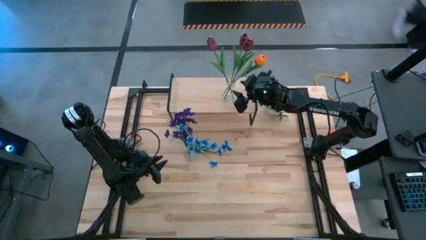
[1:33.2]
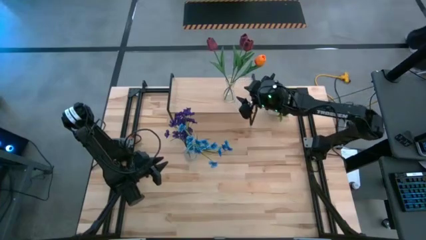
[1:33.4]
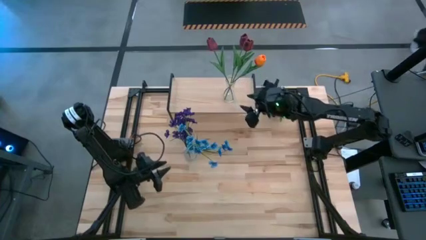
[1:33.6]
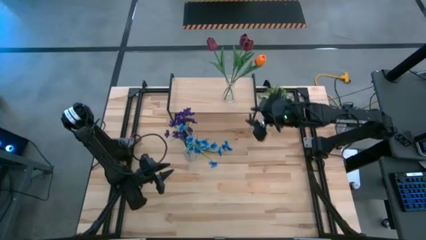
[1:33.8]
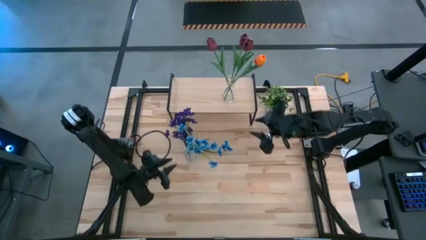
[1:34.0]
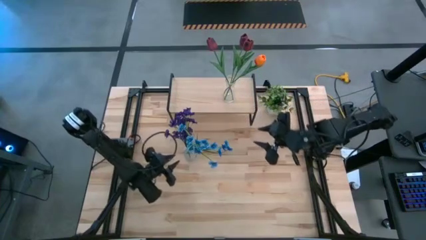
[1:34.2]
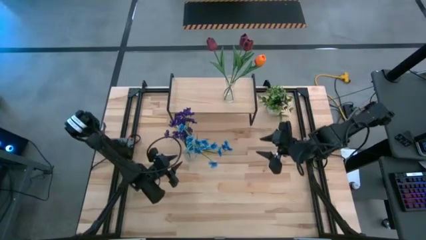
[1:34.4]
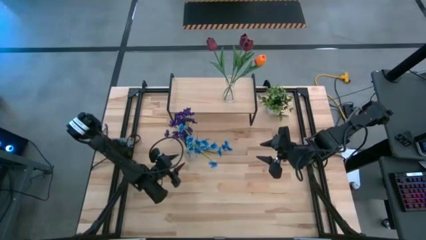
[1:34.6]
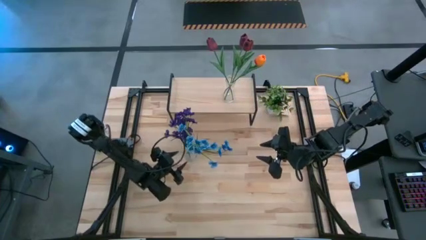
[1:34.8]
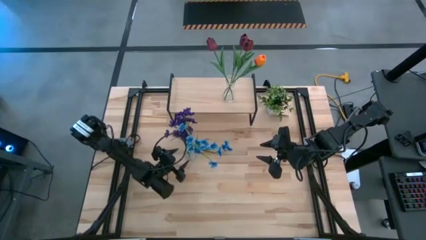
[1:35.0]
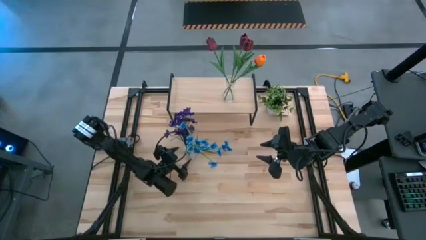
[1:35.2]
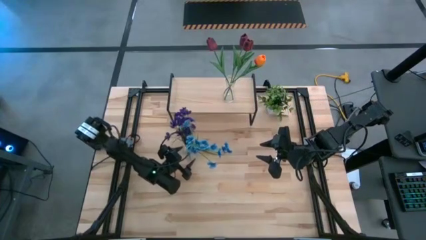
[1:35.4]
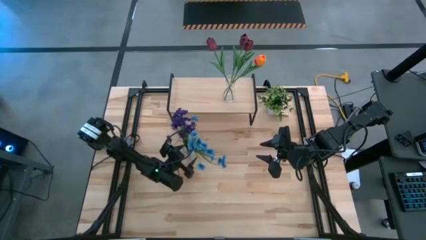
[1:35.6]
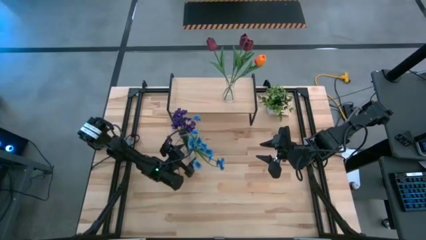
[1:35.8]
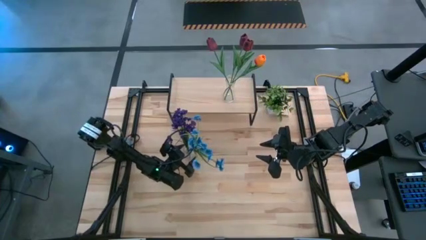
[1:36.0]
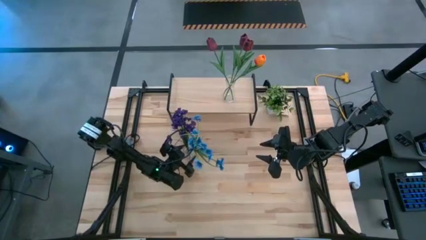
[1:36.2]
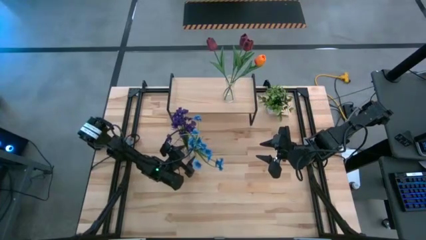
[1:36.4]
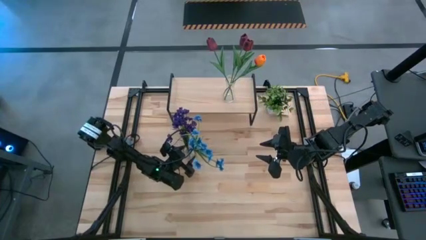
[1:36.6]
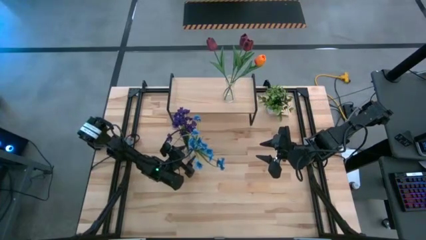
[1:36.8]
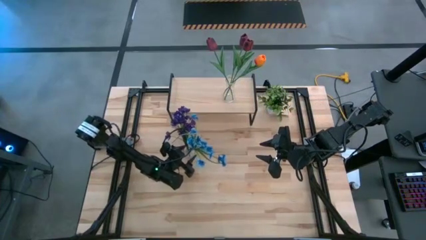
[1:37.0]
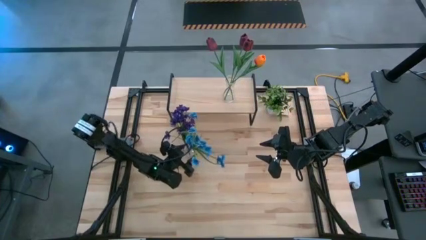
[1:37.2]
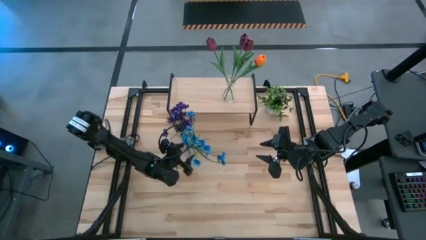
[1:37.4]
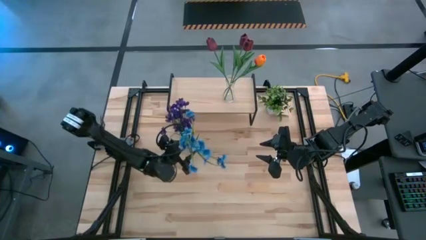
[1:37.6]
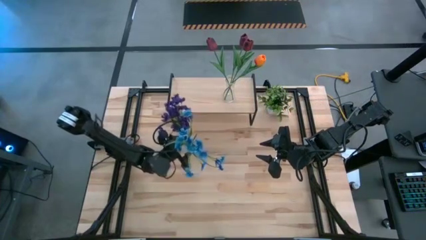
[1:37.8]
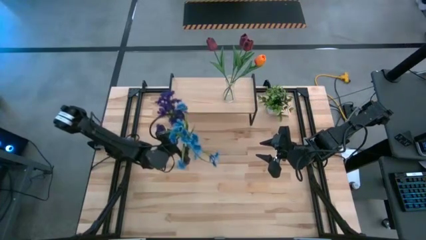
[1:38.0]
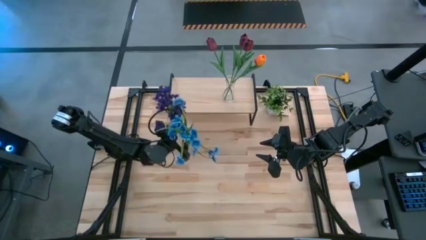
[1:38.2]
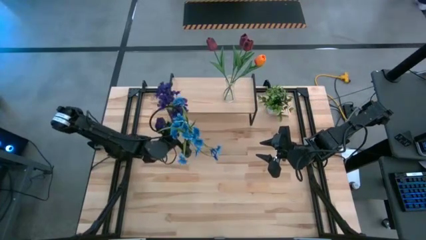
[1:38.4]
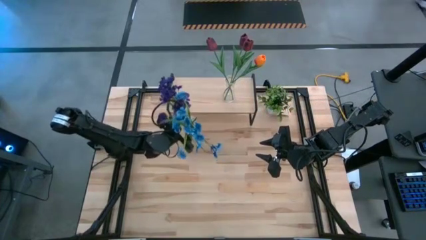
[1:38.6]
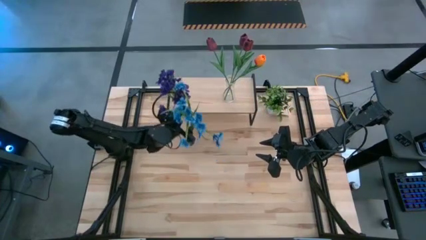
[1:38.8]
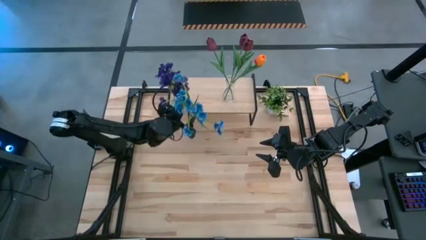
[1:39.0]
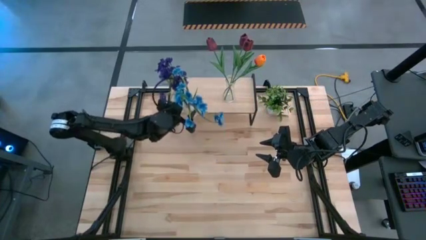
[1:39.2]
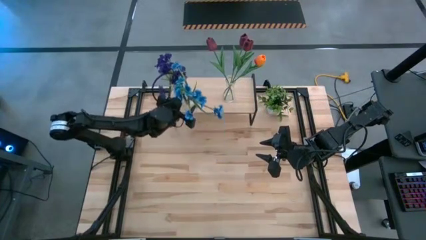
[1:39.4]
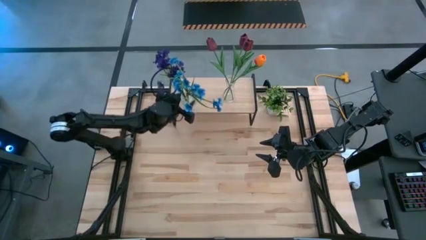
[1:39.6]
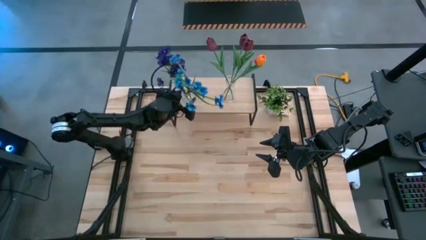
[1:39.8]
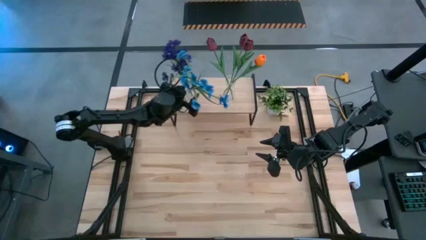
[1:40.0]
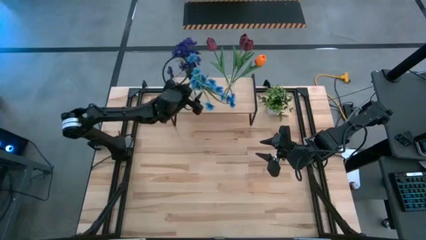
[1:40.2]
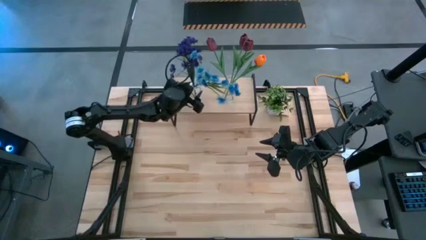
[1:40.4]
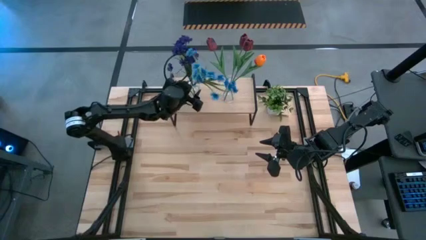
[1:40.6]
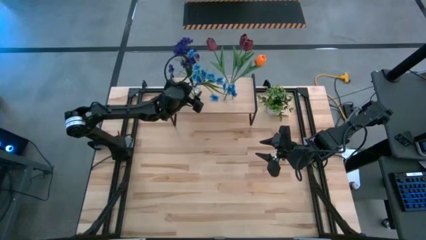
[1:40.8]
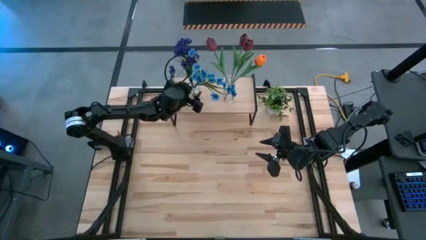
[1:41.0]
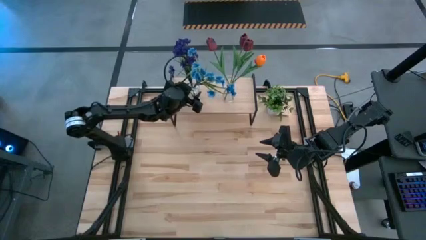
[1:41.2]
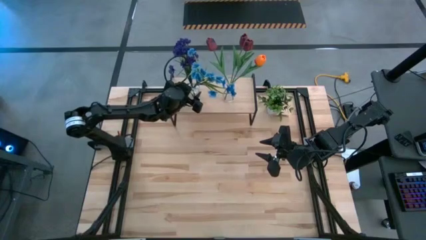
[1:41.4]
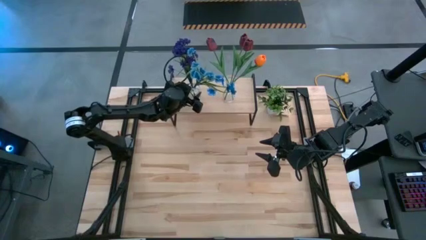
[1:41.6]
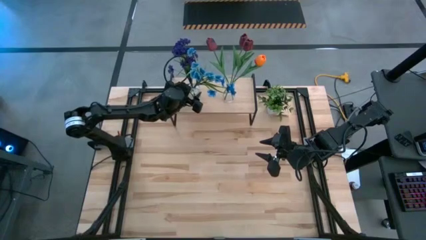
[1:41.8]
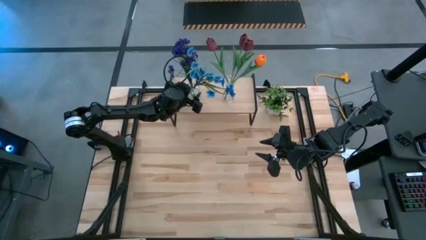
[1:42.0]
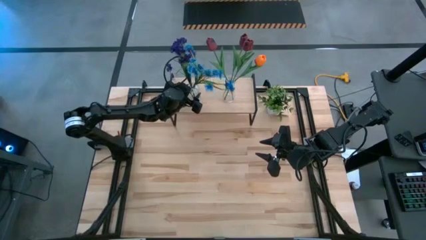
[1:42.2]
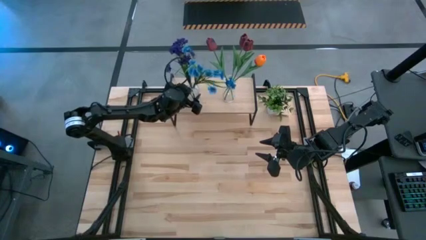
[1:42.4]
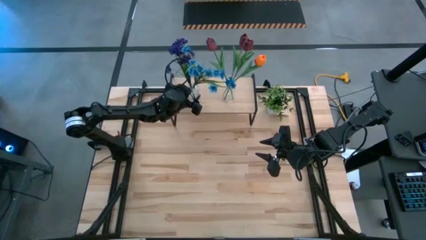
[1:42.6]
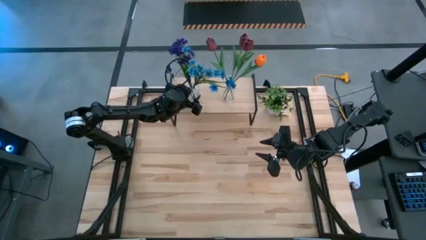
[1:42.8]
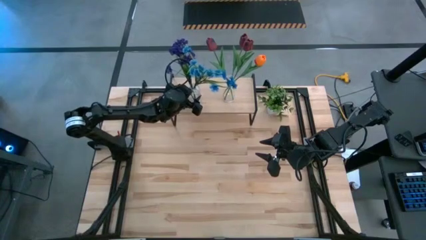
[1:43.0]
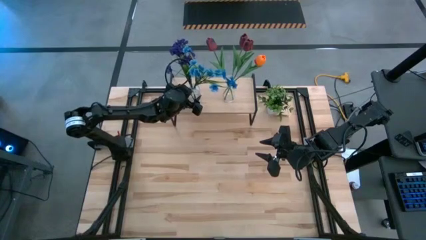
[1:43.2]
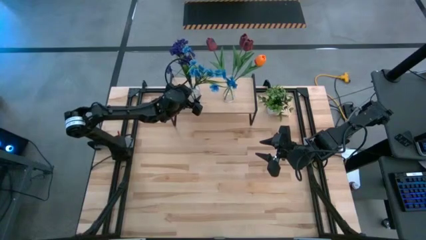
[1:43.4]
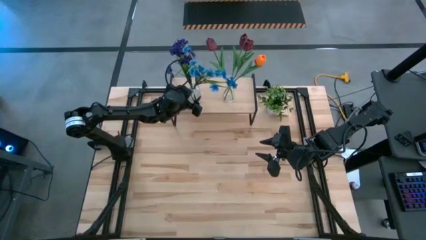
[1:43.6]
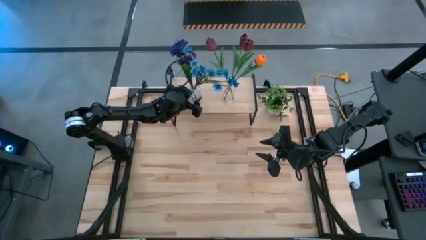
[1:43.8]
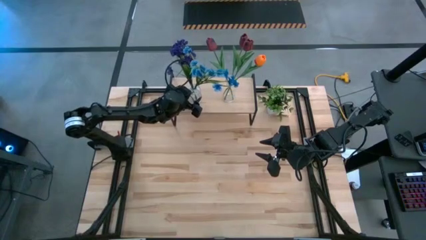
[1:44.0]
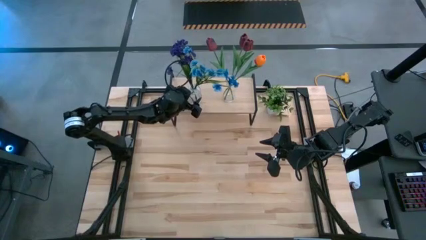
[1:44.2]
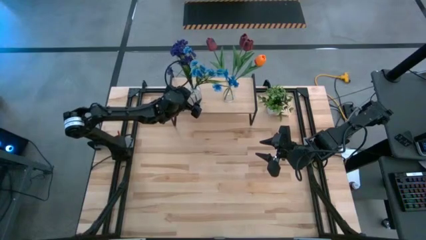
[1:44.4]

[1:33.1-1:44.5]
Task: Pick and place flowers into a vace then onto a shelf
Put the transparent vase with orchids on the shelf

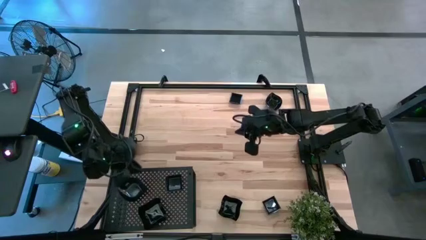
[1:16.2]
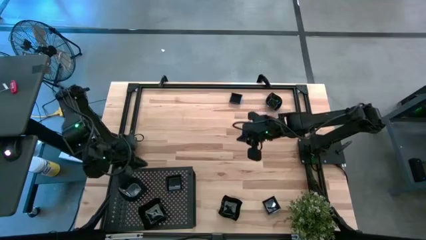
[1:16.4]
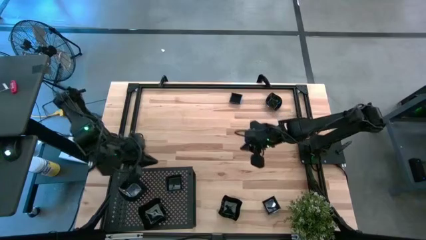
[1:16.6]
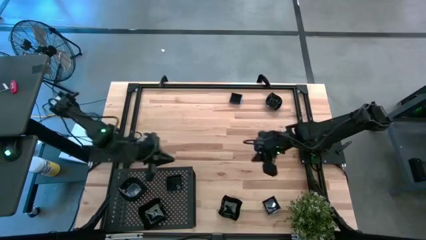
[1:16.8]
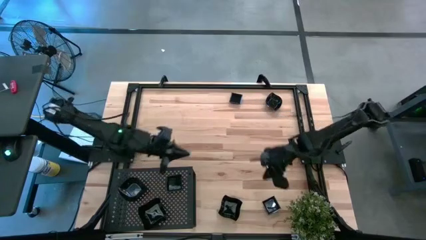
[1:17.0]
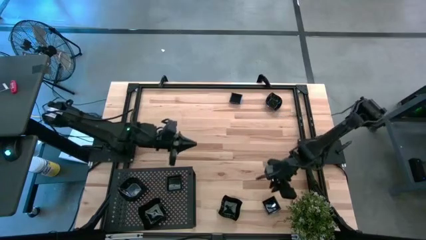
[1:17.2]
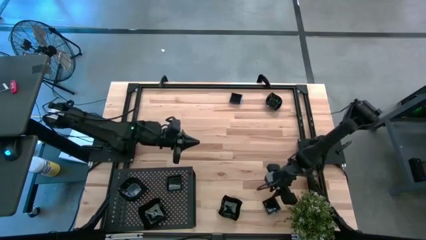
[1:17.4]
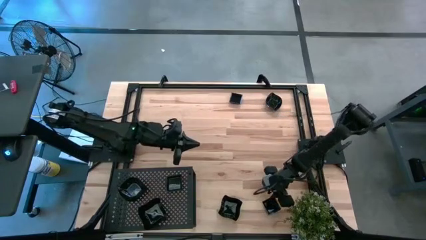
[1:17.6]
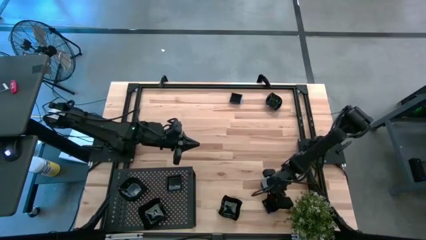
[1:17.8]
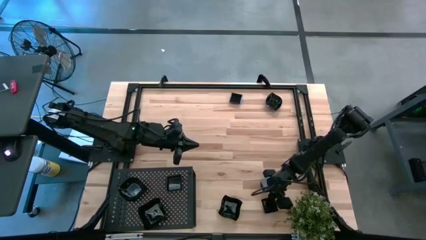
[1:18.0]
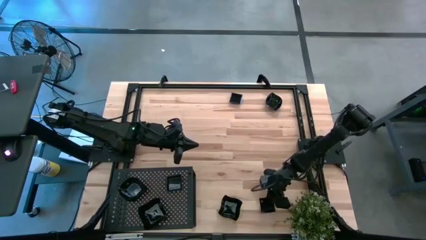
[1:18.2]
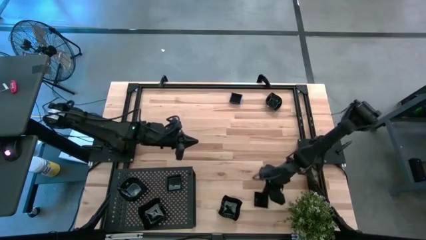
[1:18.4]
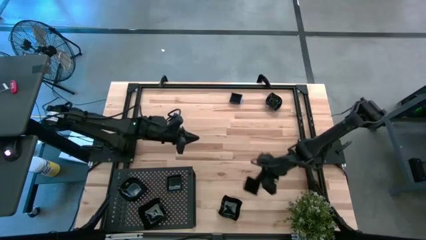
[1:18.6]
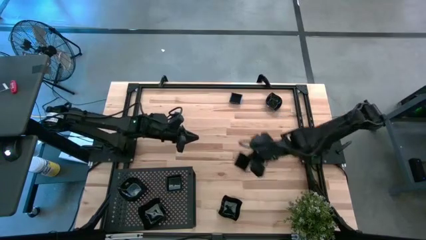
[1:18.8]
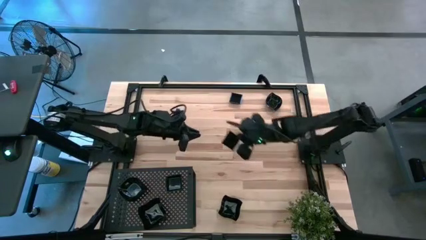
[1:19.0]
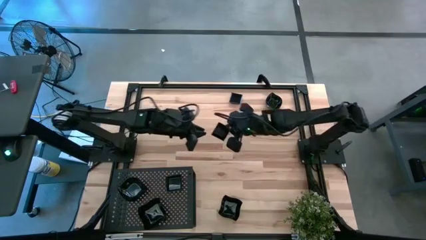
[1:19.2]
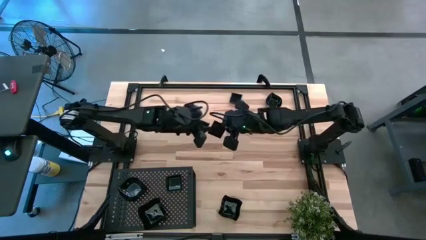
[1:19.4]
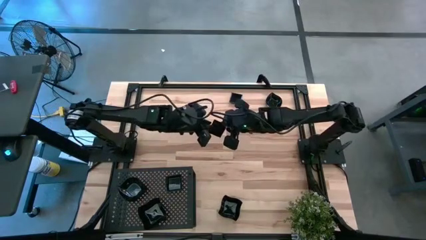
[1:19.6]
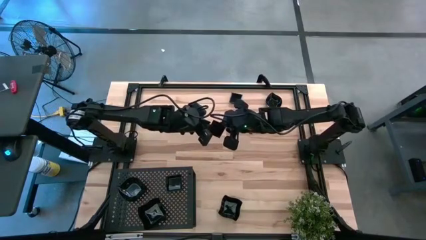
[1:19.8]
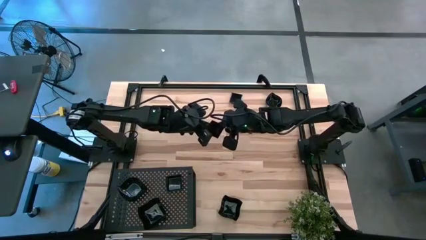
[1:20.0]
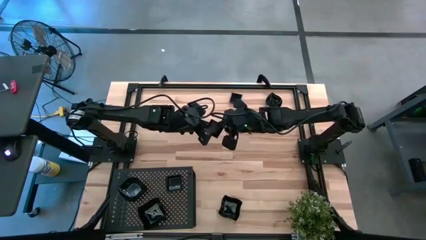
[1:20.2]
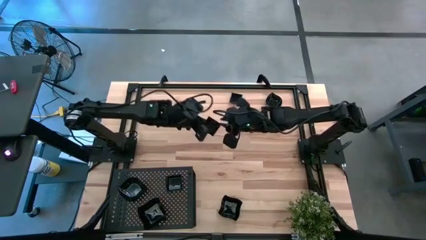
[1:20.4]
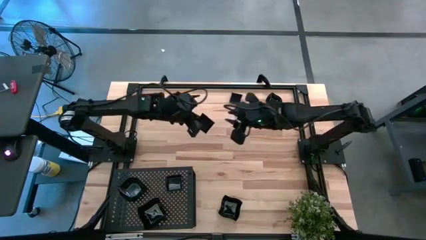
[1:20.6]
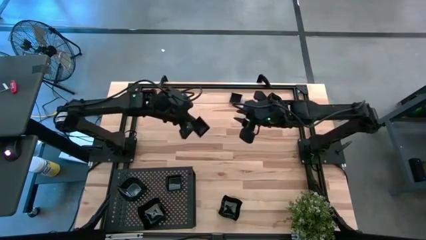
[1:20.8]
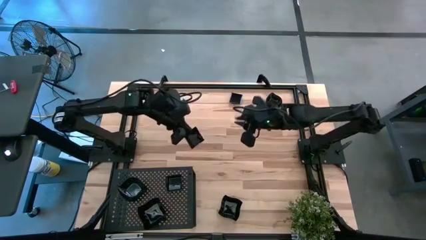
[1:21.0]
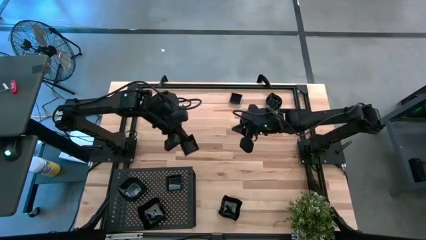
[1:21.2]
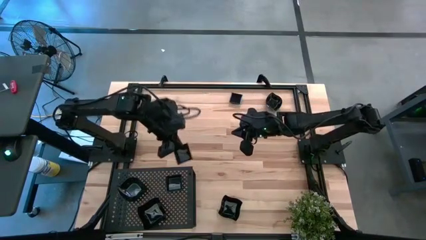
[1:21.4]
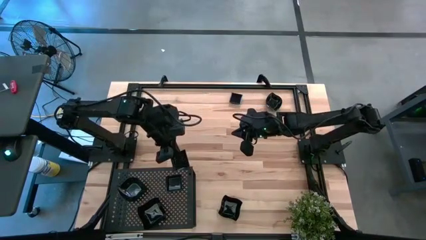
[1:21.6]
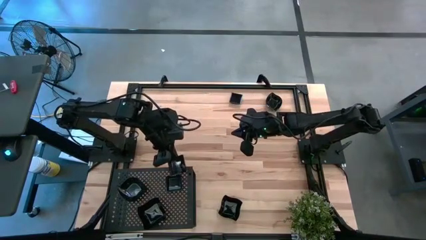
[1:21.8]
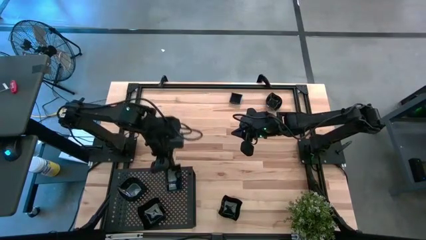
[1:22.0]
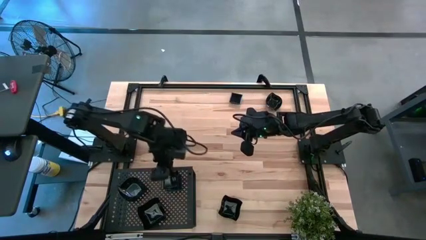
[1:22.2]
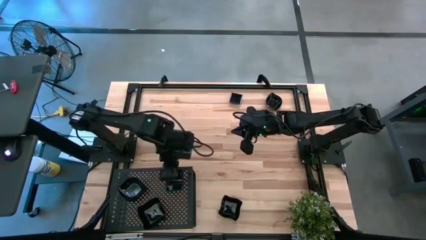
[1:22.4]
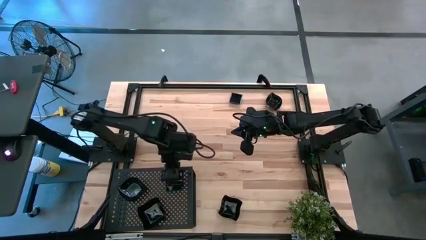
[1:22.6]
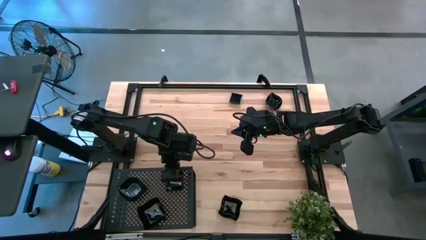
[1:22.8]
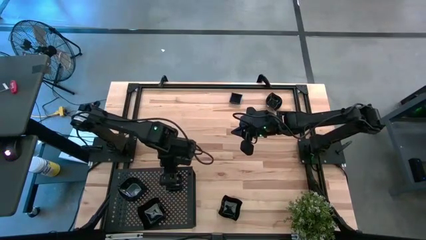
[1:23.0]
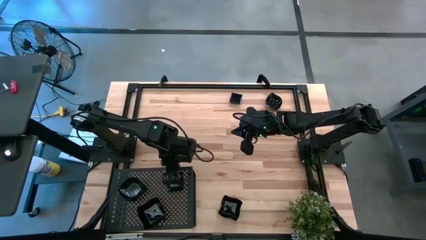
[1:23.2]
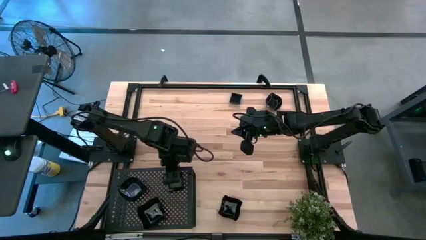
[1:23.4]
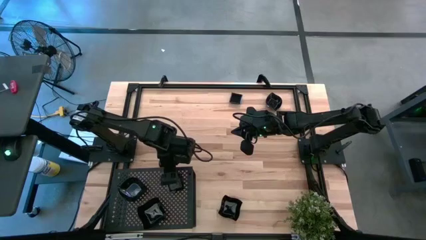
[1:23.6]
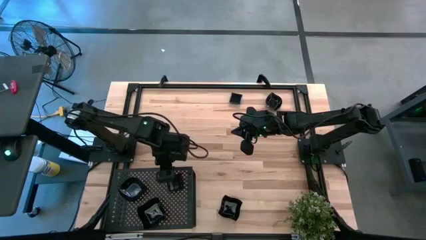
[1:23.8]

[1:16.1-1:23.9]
Task: Pick & Place Mini shaped plates
Stack the square plate on top of the square plate on the shelf
